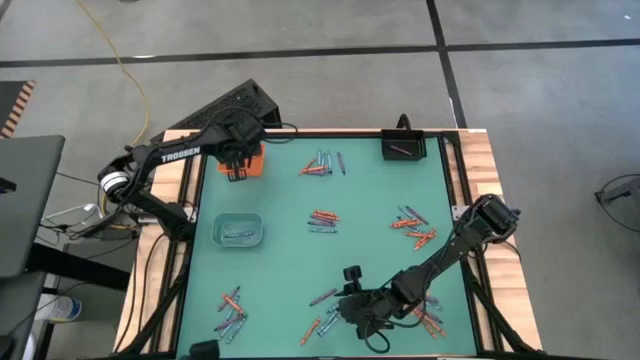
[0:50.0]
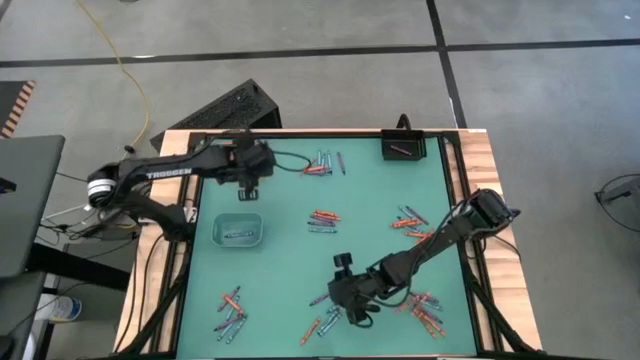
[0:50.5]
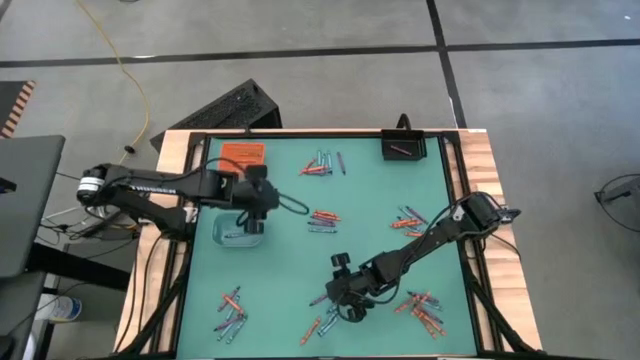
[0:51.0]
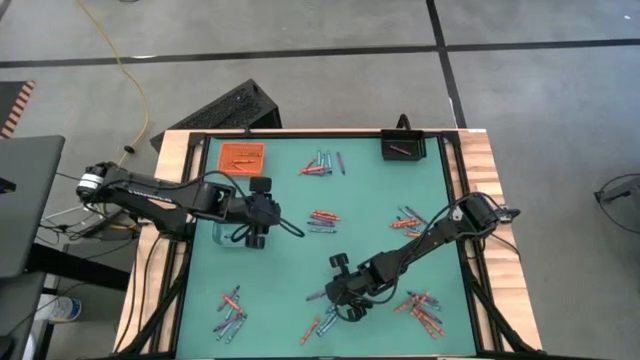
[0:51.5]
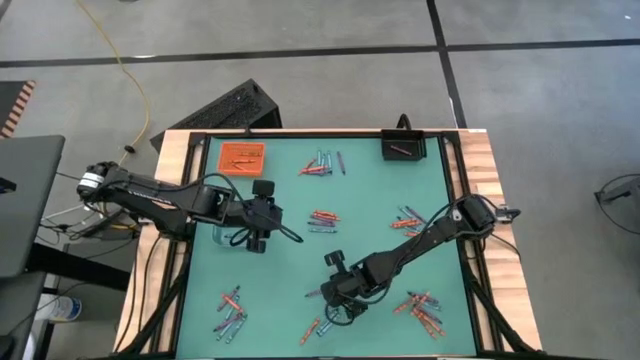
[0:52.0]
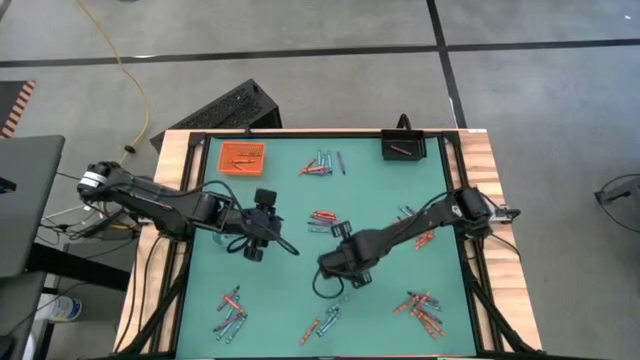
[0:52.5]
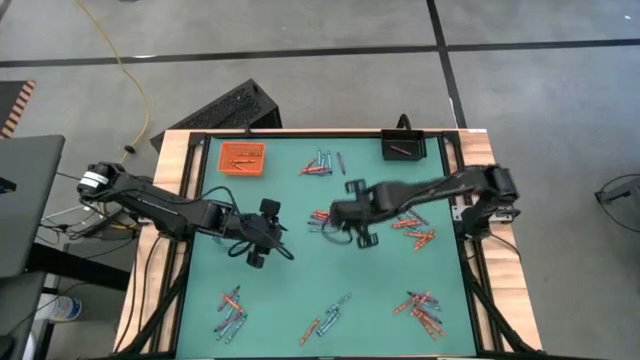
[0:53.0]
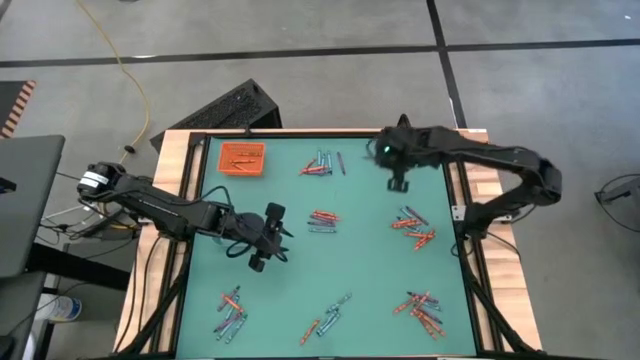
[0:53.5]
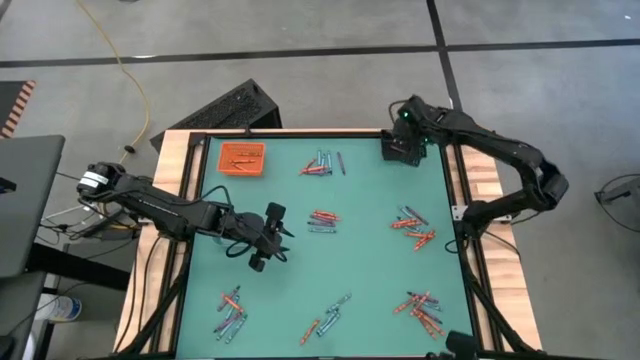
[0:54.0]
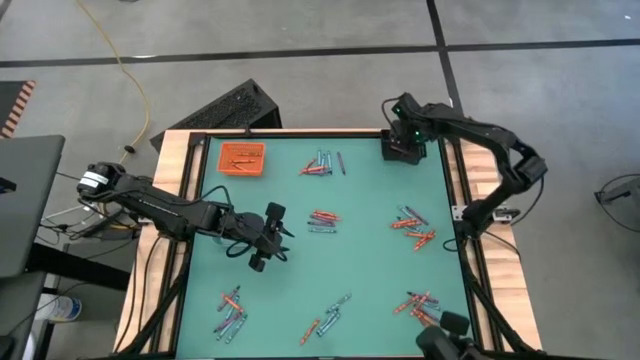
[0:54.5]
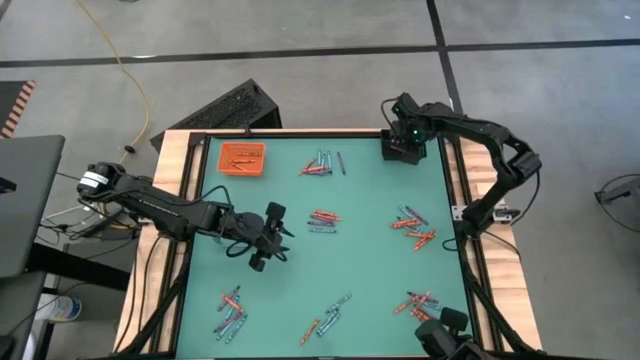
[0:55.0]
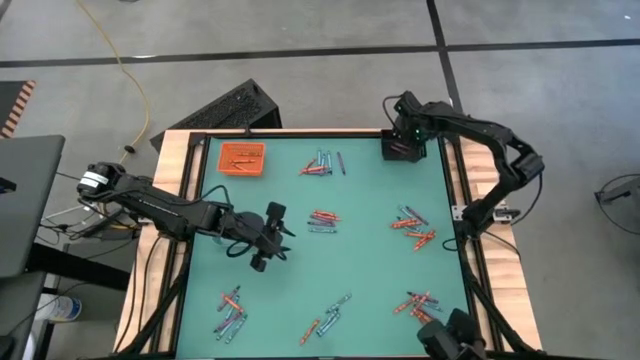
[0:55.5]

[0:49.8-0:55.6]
Task: Sort crayons
Put the purple crayon into the black basket

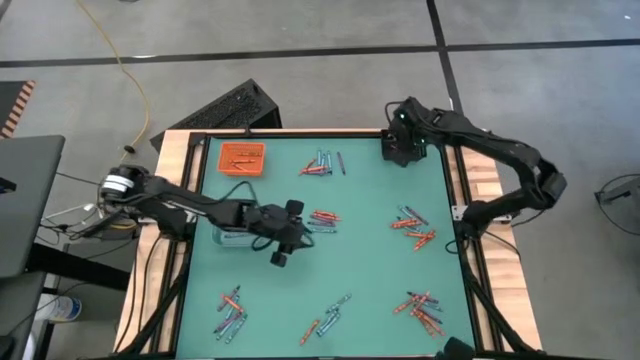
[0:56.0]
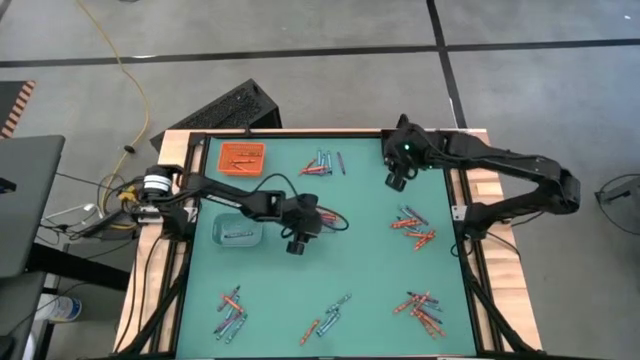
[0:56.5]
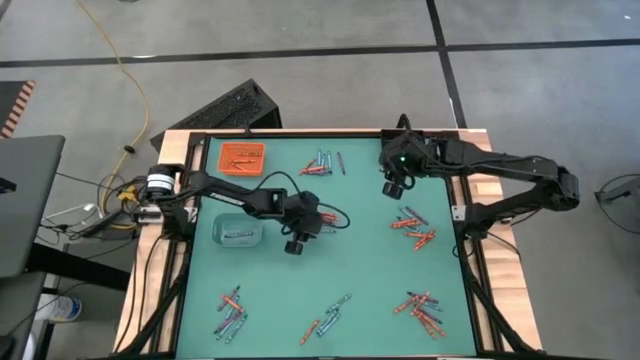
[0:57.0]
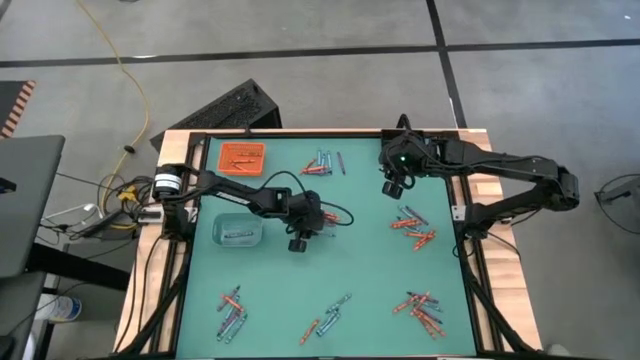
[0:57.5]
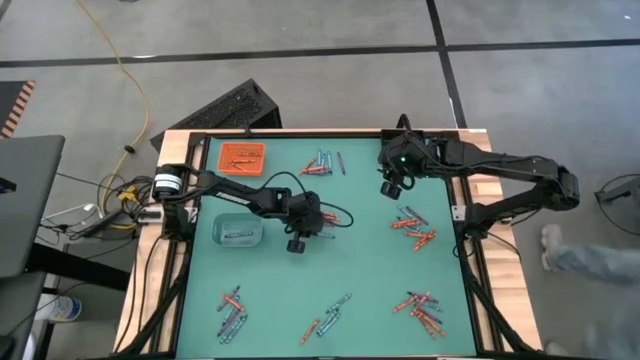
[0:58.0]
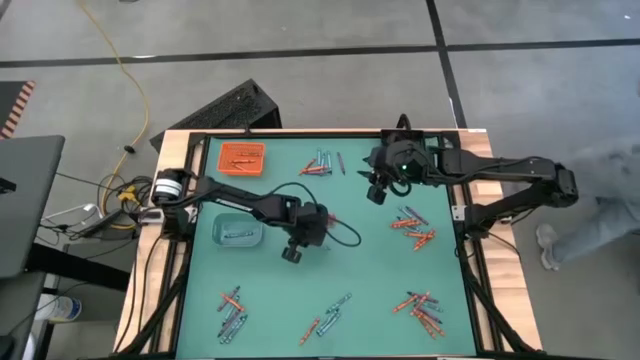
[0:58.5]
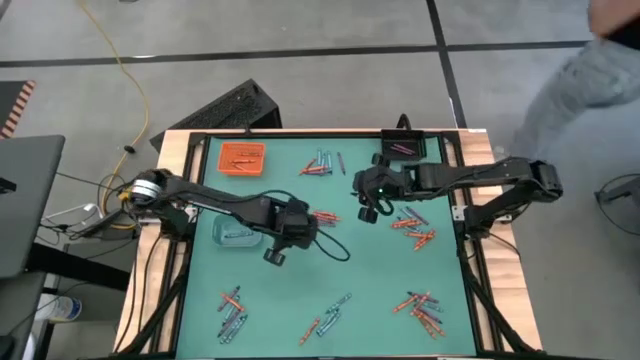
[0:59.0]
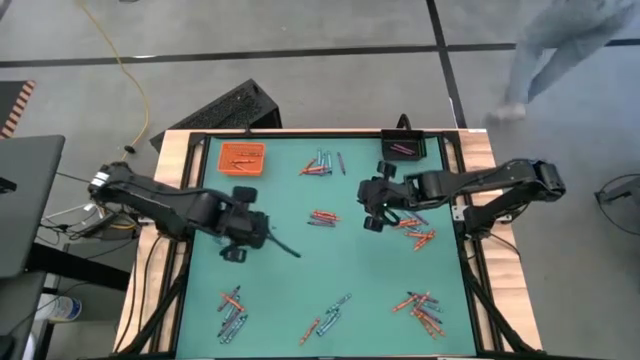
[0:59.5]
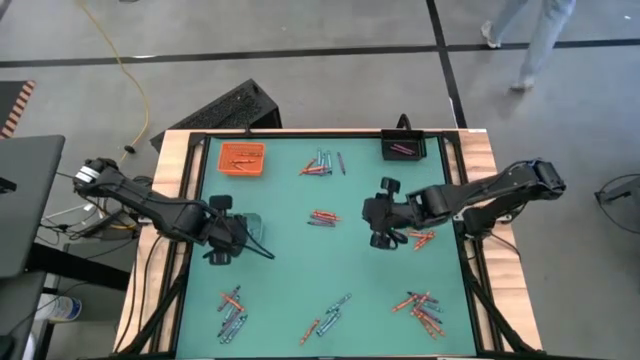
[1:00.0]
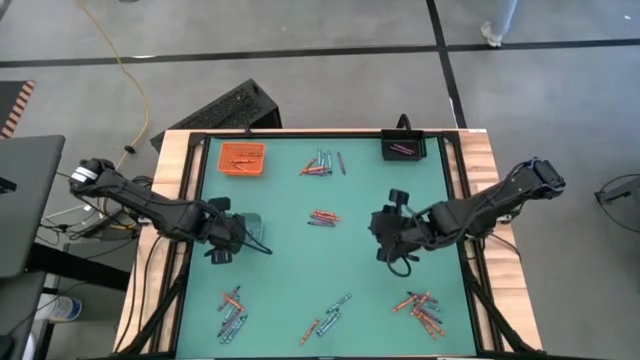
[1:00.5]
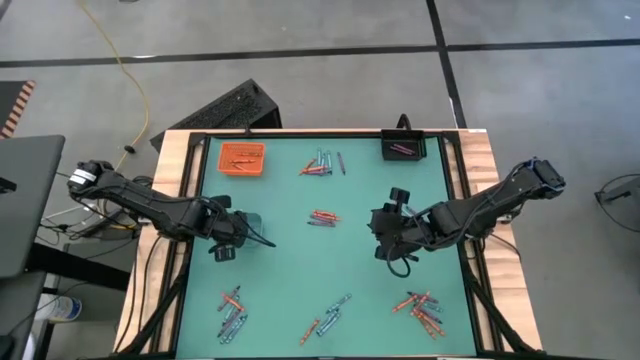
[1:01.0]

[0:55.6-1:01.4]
Put the blue crayon into the blue bin

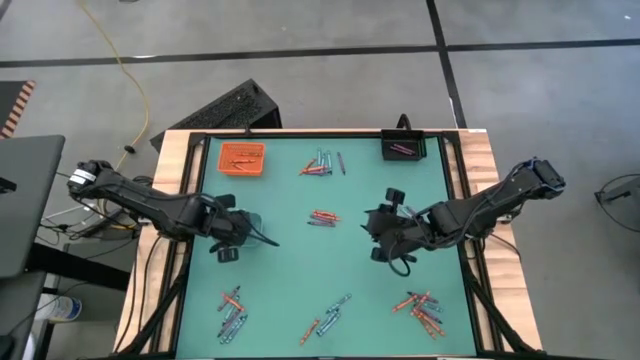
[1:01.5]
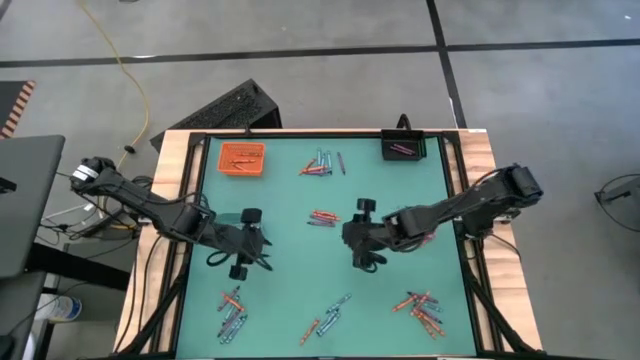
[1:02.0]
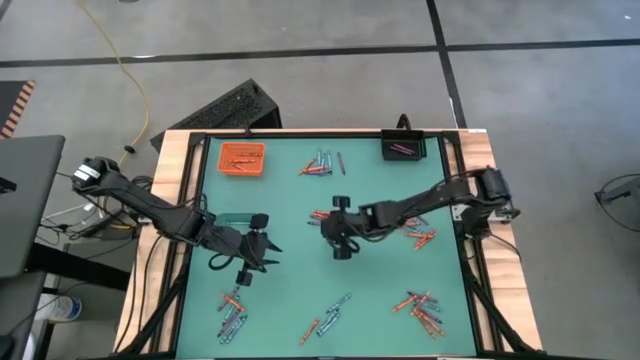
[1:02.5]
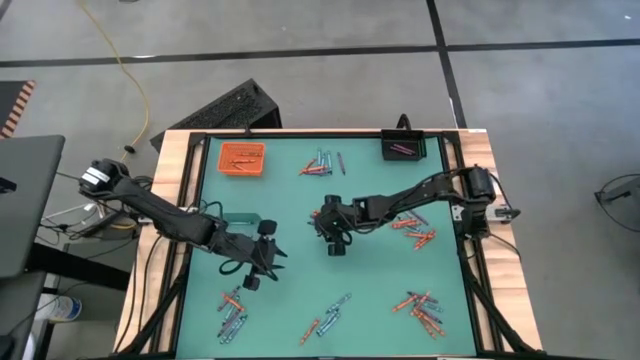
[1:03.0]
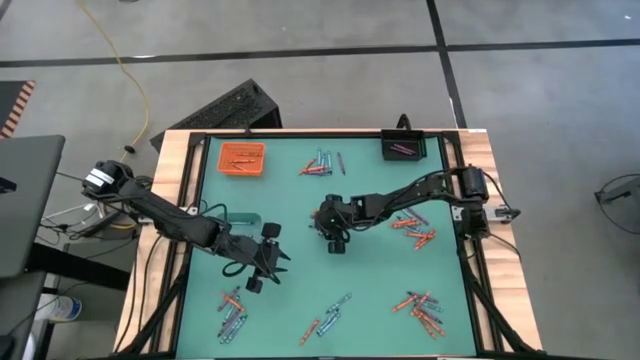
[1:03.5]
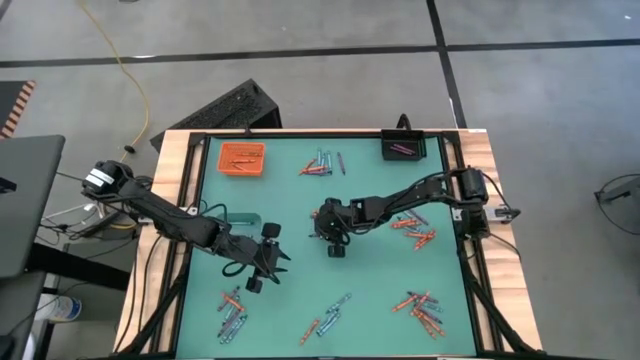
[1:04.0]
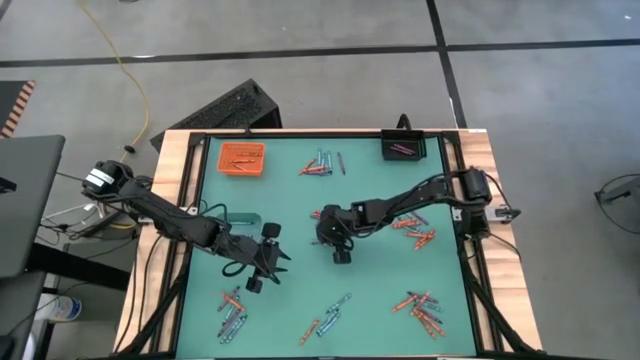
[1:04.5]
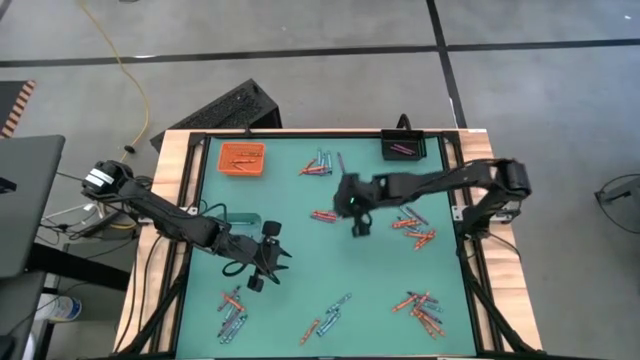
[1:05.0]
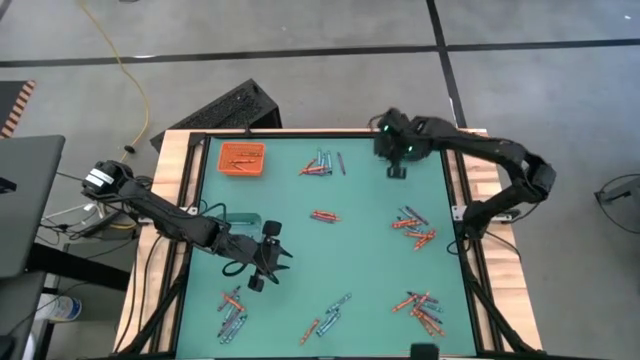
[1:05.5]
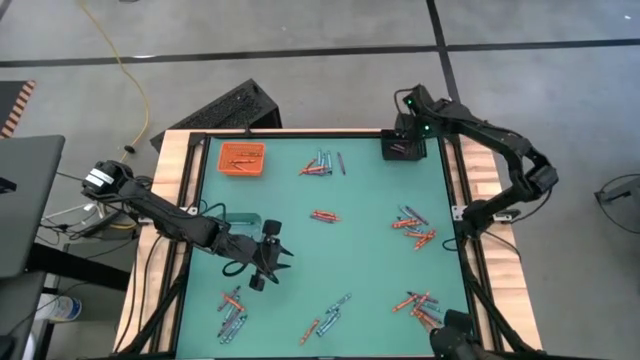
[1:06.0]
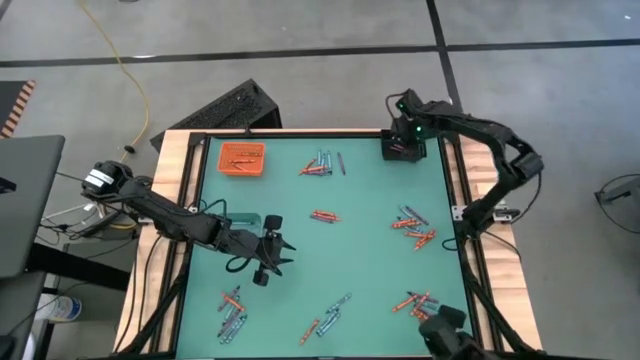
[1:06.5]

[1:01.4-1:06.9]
Put the purple crayon into the black basket

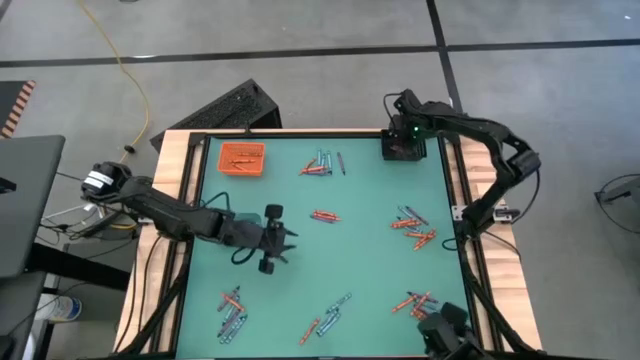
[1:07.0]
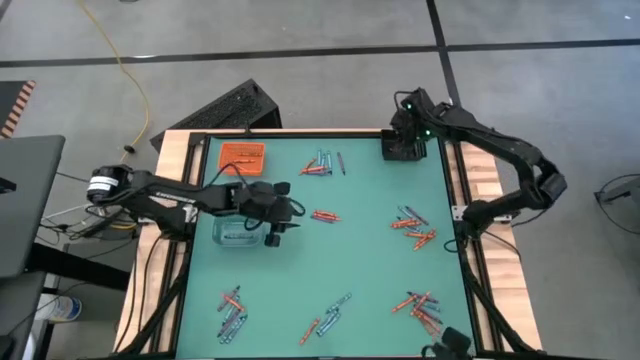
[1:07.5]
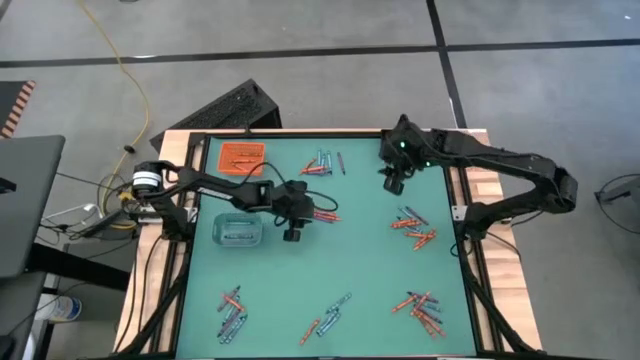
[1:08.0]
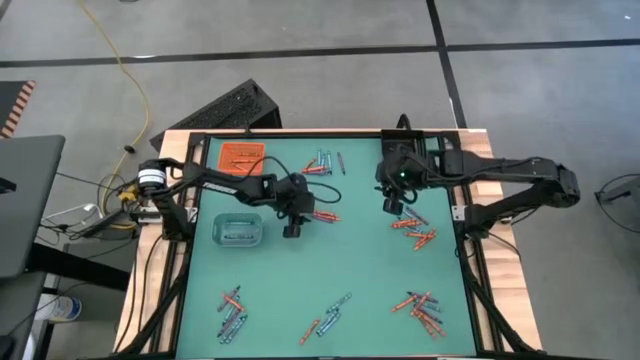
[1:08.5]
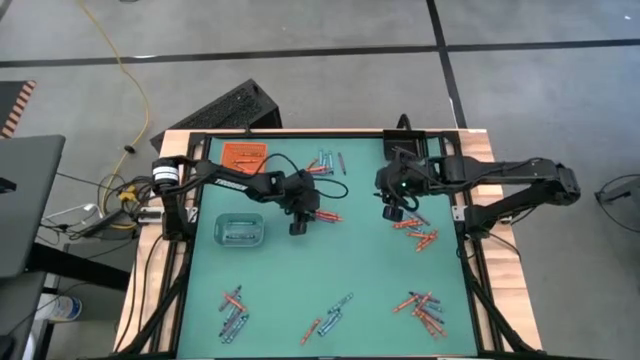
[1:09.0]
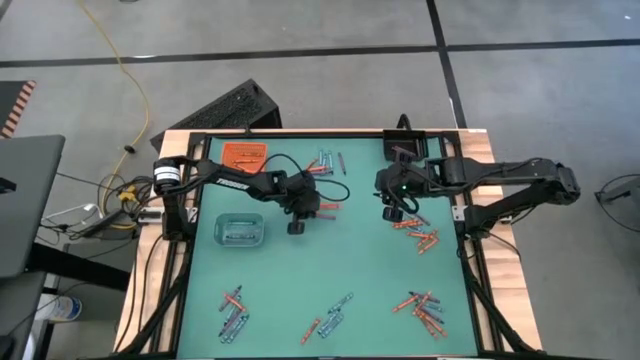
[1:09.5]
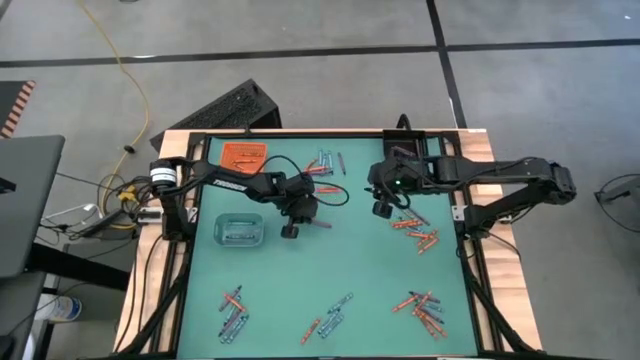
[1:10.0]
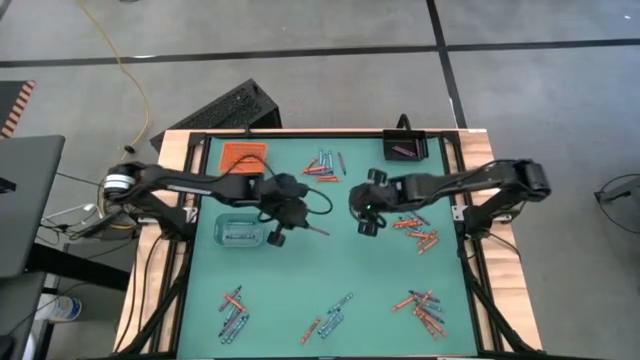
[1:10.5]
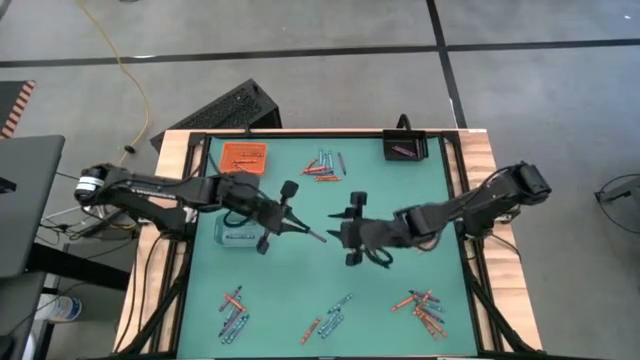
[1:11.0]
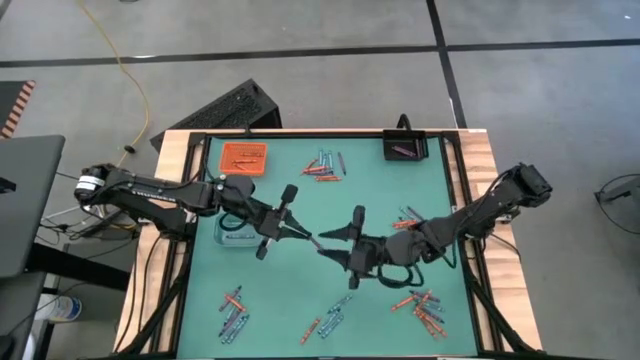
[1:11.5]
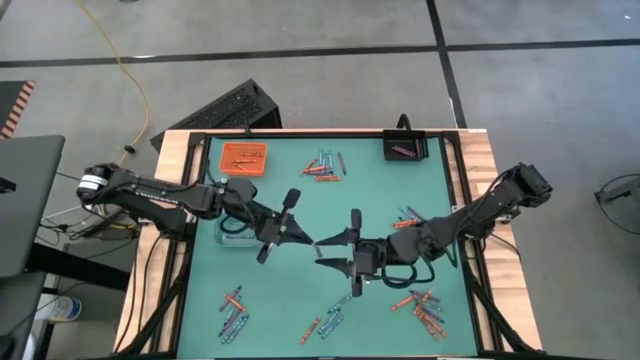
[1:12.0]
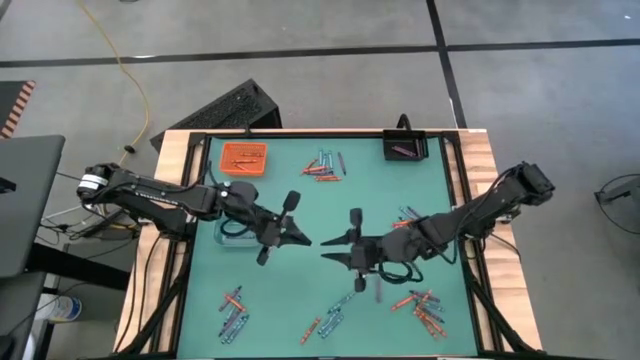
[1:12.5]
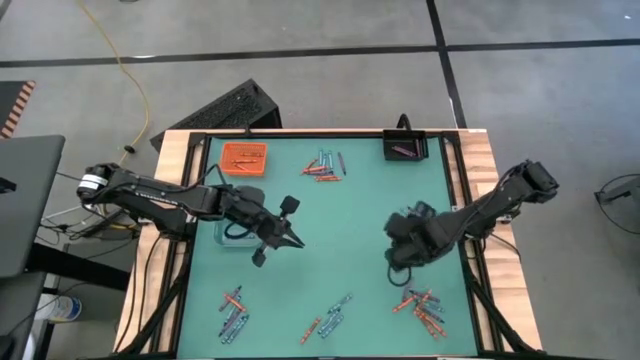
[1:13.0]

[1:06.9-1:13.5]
Put the purple crayon into the black basket
